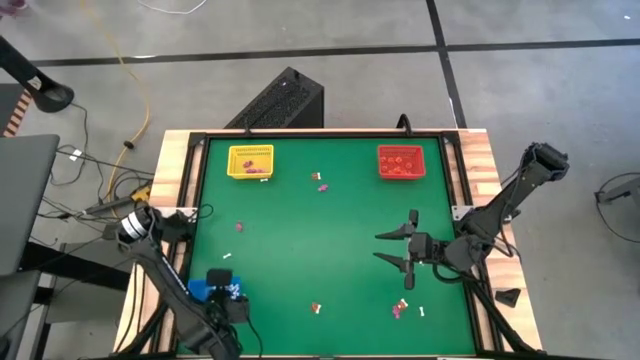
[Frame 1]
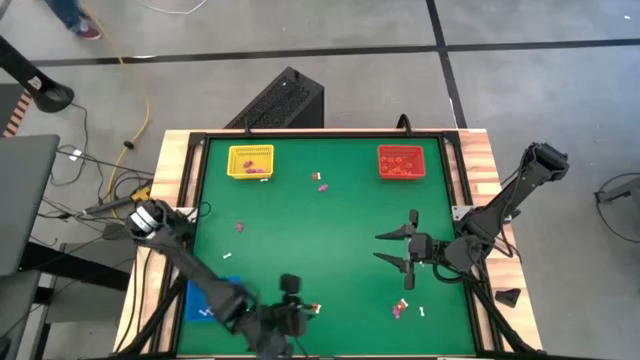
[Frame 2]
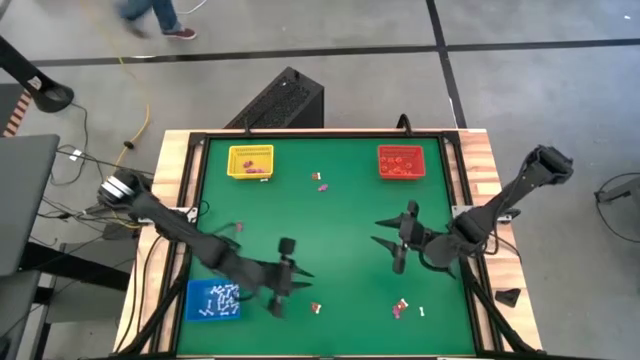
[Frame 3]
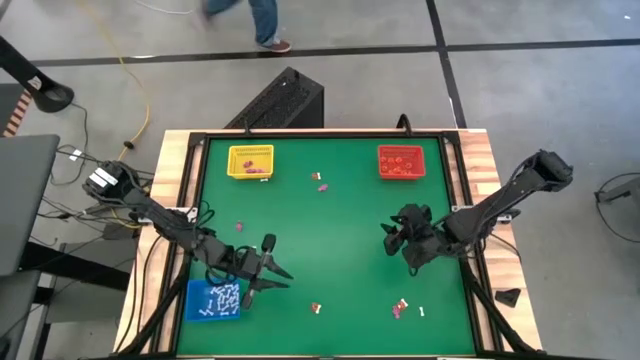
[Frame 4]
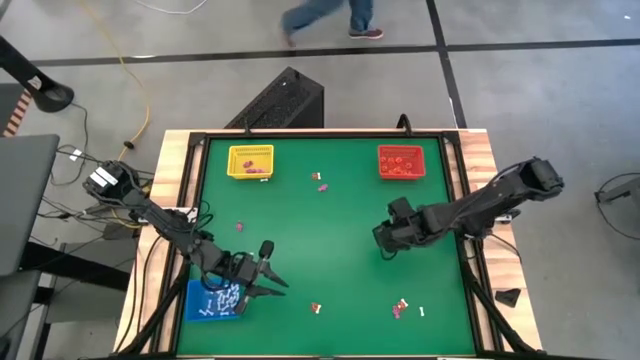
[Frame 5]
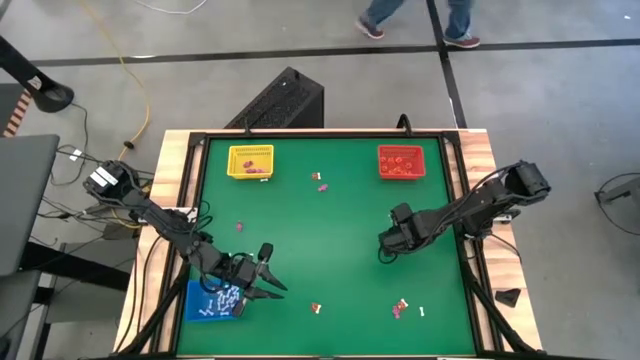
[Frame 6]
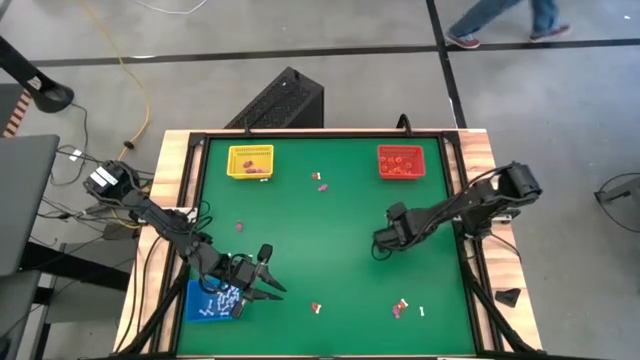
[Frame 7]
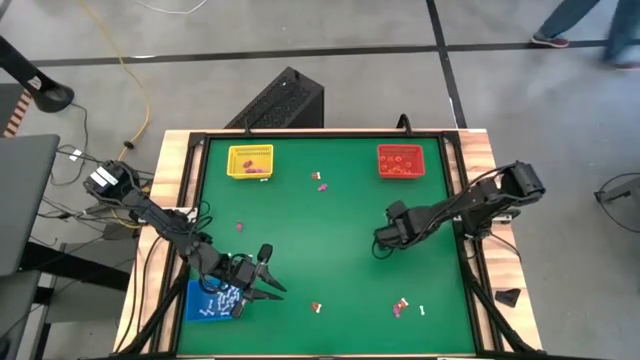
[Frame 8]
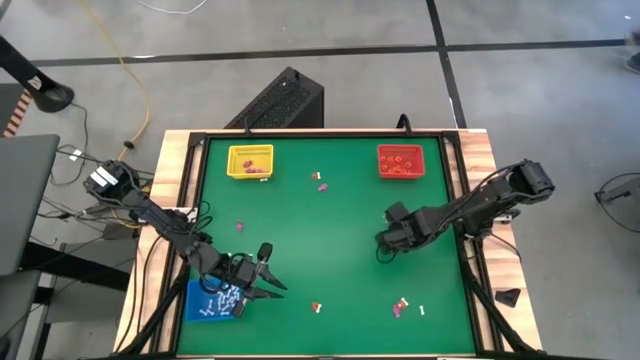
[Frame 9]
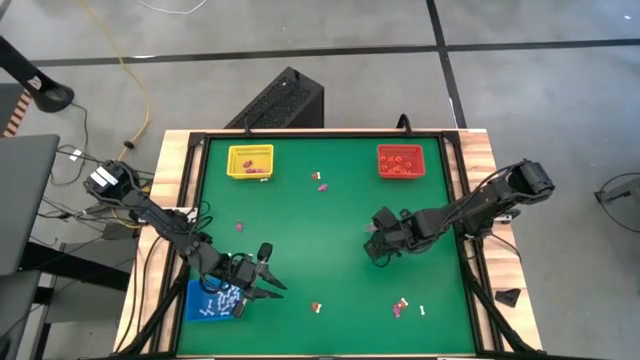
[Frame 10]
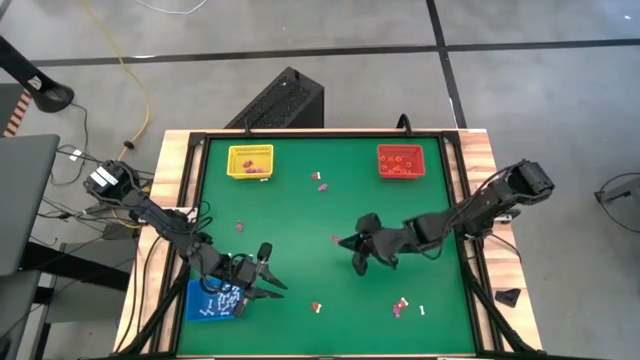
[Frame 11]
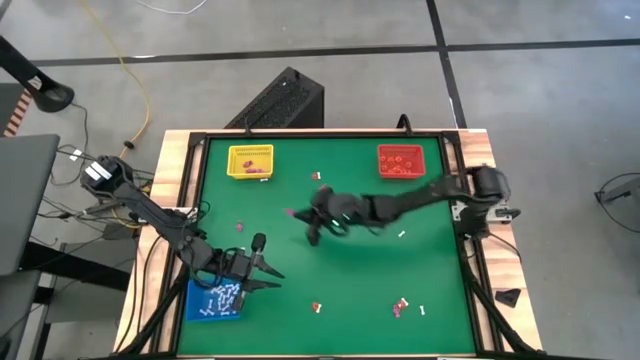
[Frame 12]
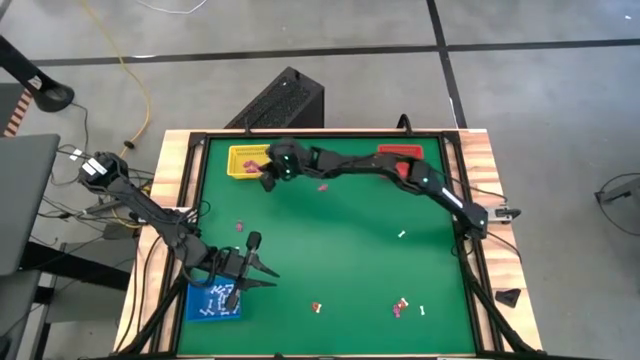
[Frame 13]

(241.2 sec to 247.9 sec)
Task: Sort Halloween decoration
Put the pink skeleton toy into the yellow bin

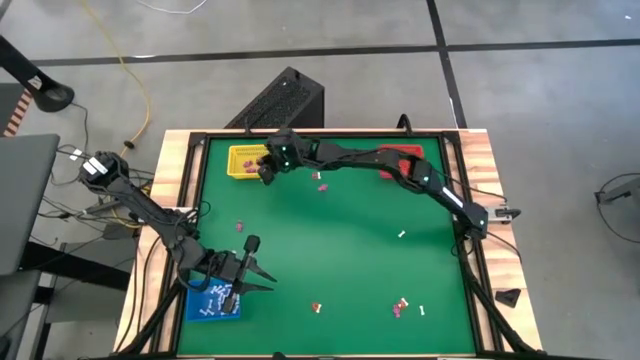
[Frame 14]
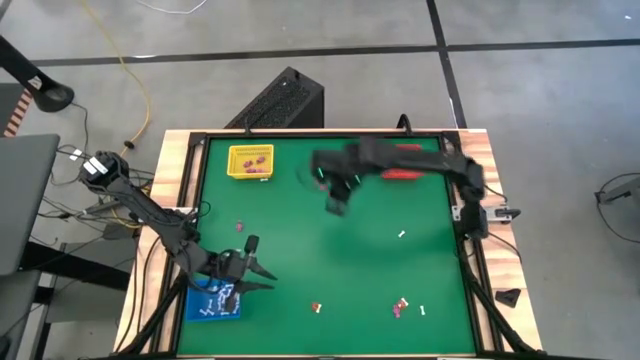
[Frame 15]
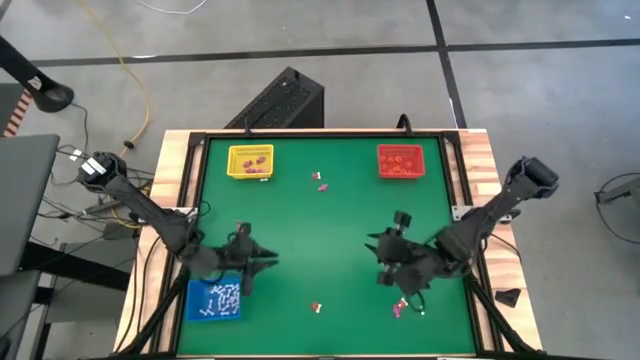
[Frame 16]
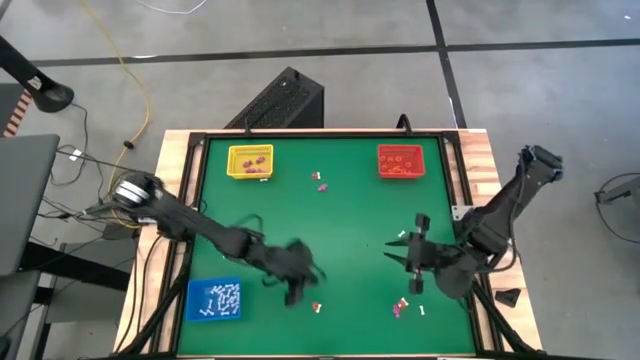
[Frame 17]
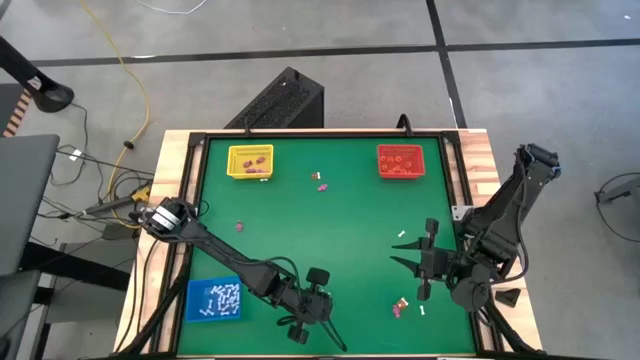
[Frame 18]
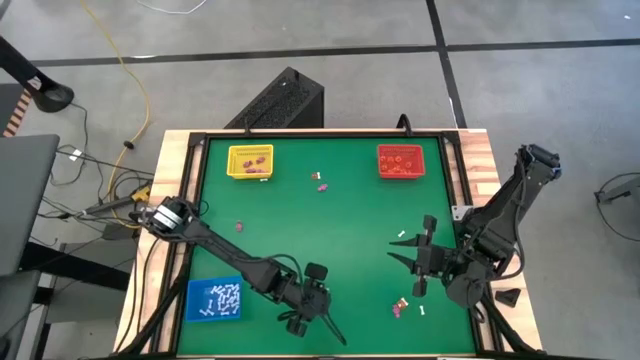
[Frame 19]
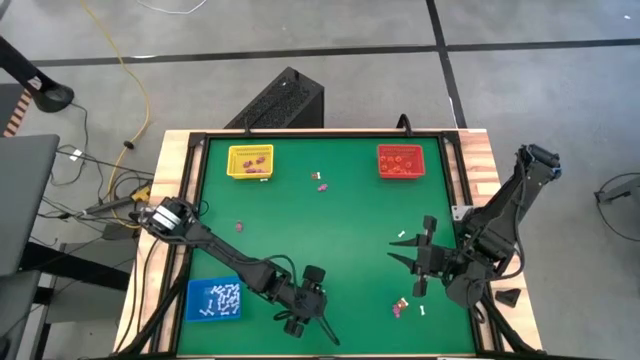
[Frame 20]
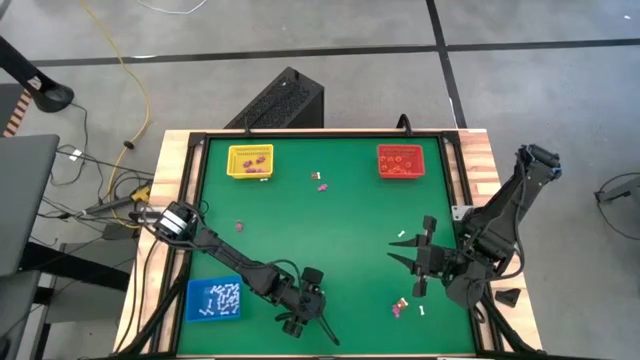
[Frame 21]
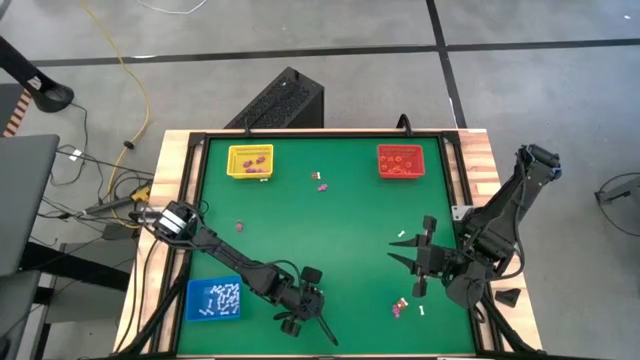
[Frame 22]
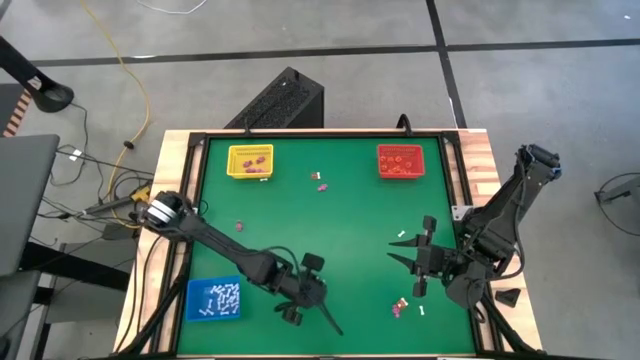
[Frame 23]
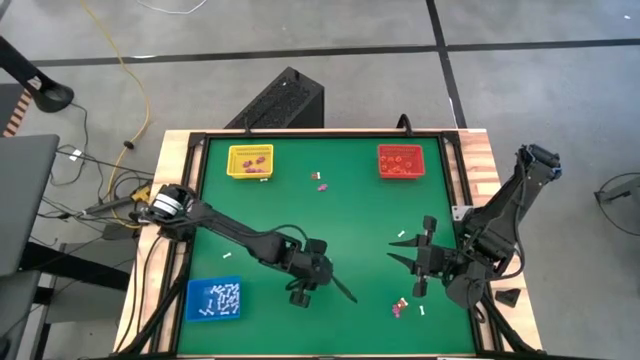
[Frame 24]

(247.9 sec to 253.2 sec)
Put the orange clover toy into the orange bin

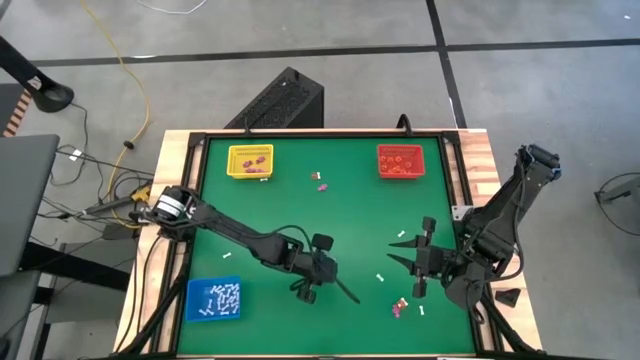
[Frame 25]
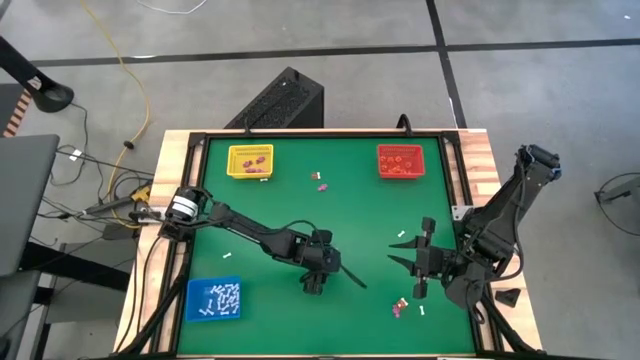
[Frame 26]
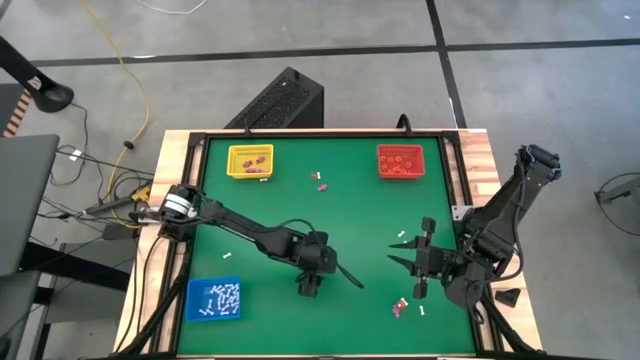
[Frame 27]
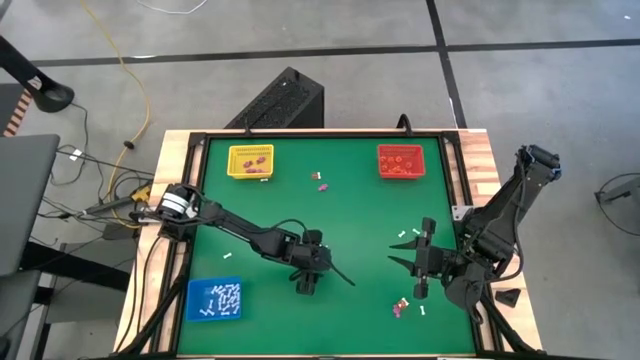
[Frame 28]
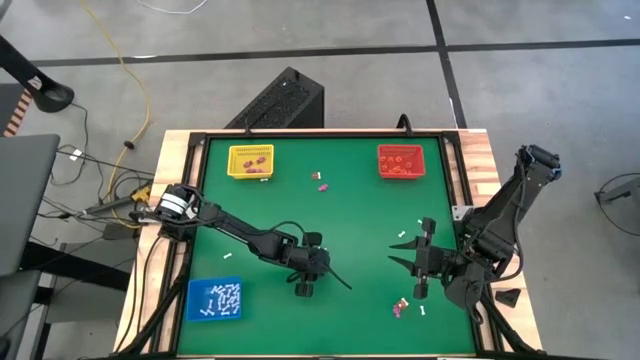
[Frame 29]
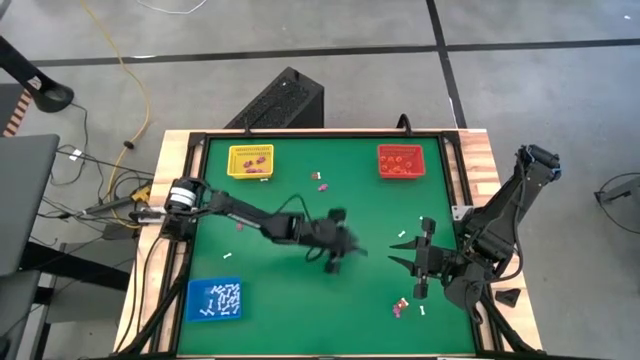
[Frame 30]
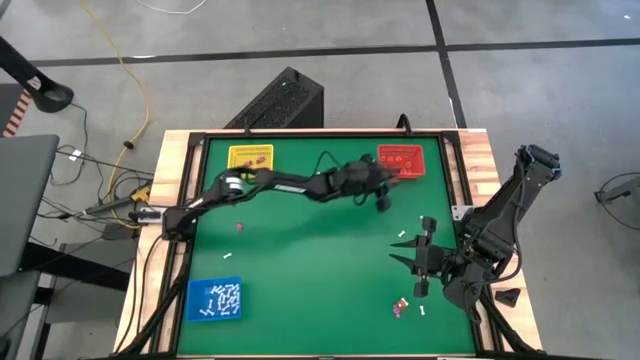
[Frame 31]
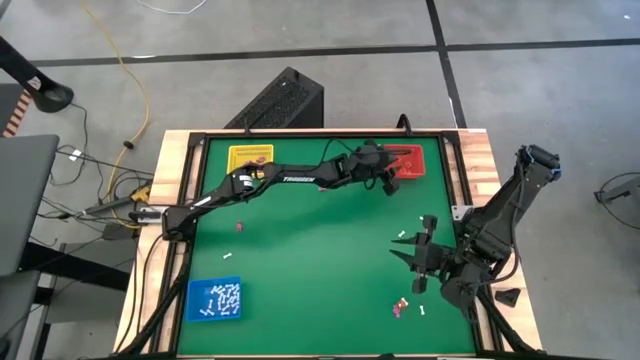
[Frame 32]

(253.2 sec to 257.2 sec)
Put the pumpkin toy into the orange bin

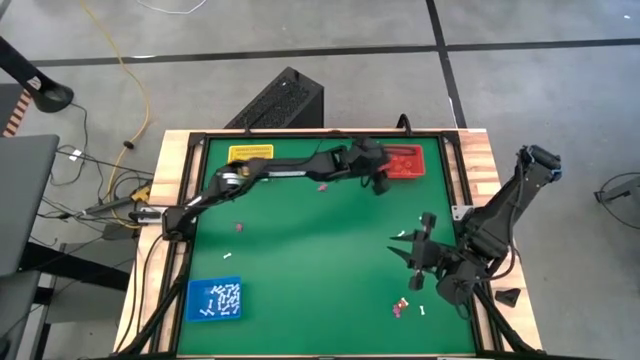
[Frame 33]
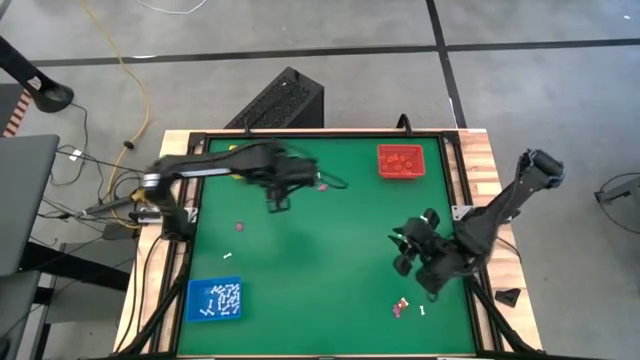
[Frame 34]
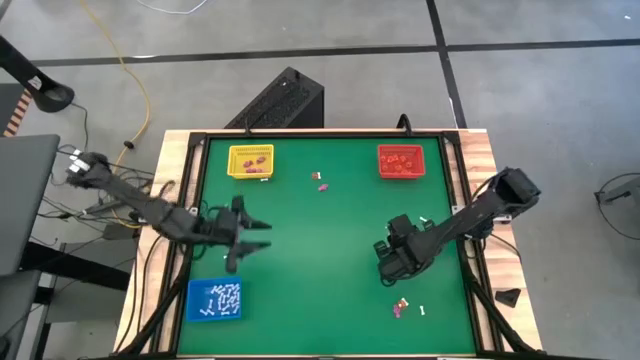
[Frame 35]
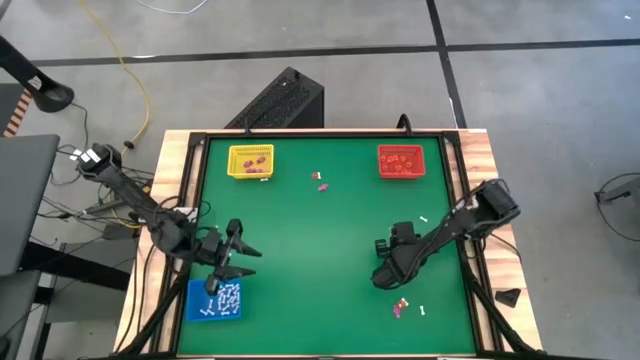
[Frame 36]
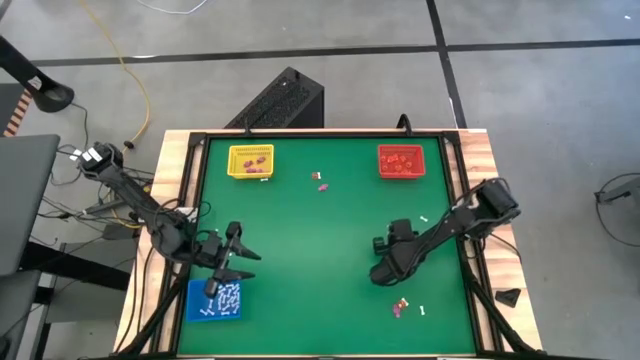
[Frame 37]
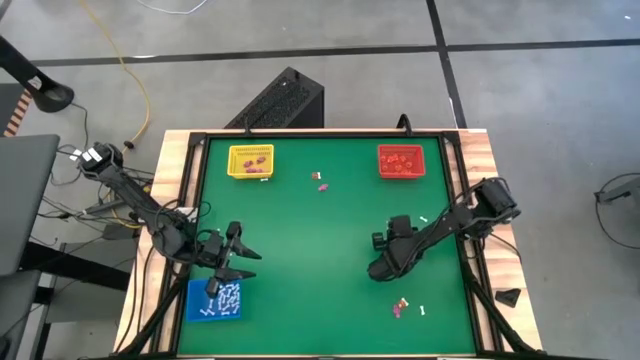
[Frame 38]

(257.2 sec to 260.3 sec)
Put the white bone toy into the blue bin

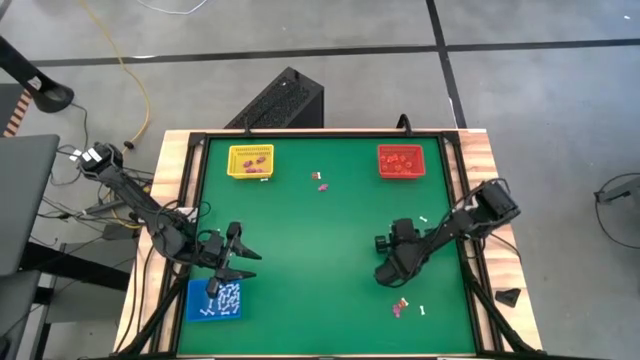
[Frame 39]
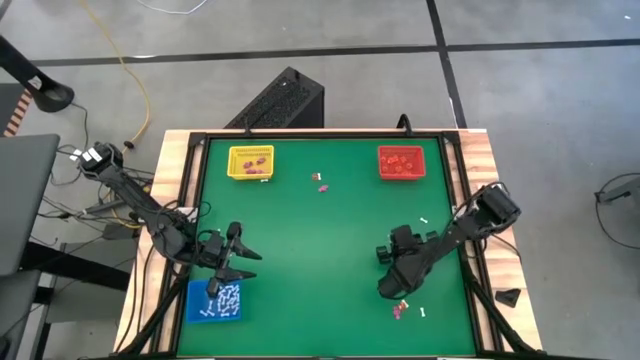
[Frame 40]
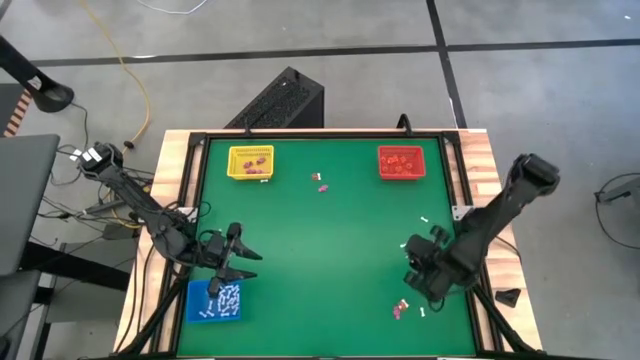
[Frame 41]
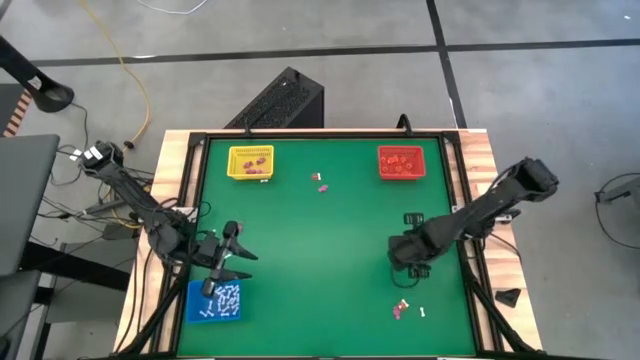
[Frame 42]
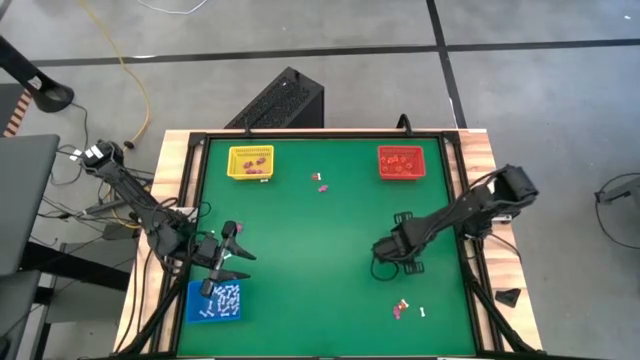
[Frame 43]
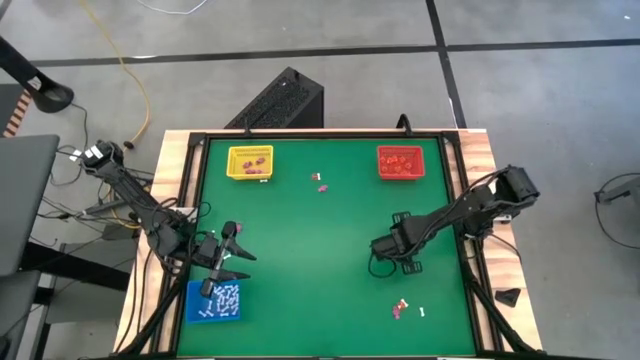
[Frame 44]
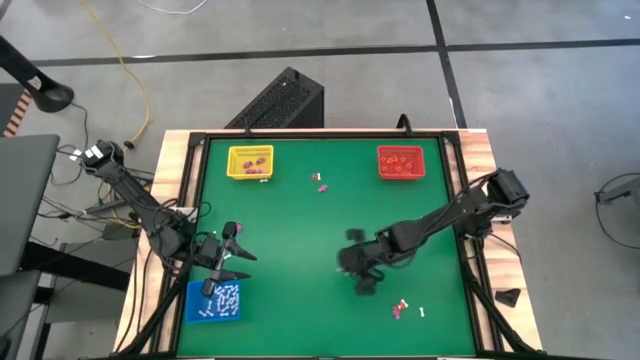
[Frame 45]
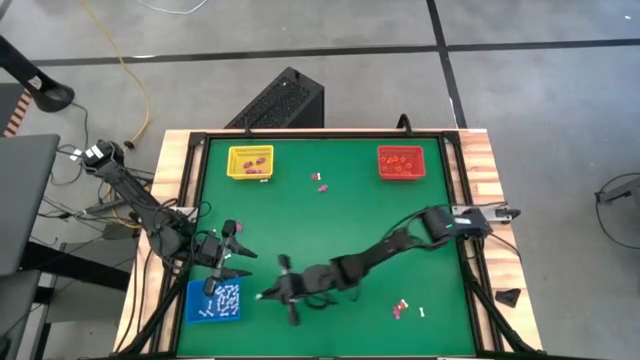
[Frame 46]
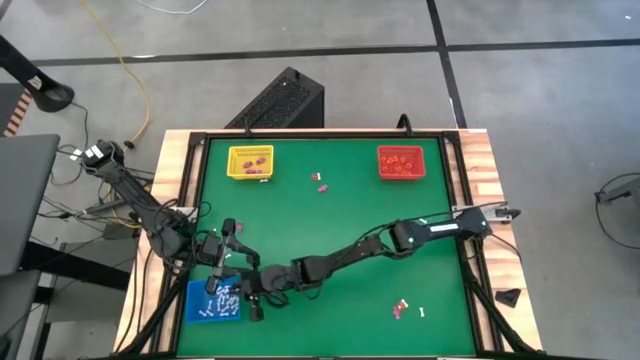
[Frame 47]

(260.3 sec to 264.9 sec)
Put the white bone toy into the blue bin
